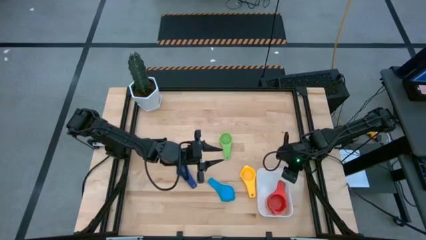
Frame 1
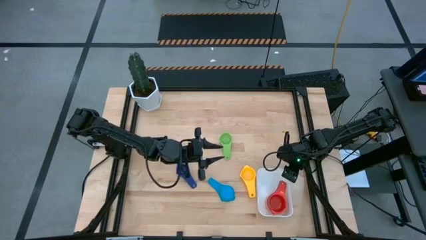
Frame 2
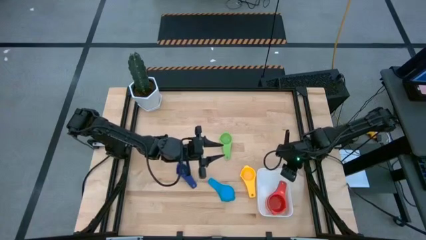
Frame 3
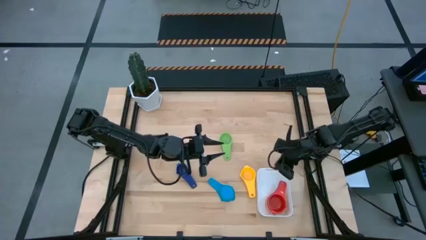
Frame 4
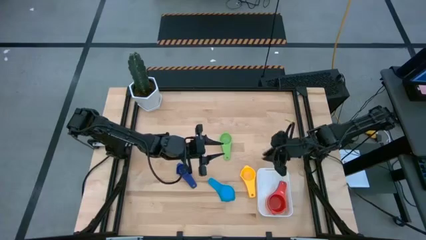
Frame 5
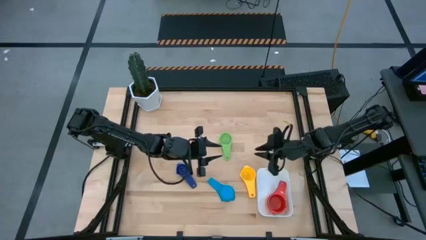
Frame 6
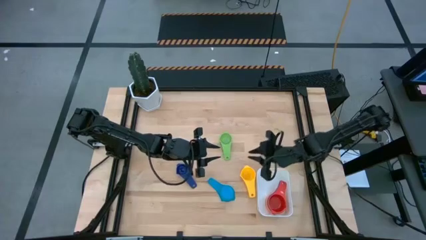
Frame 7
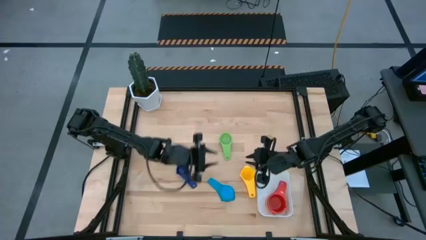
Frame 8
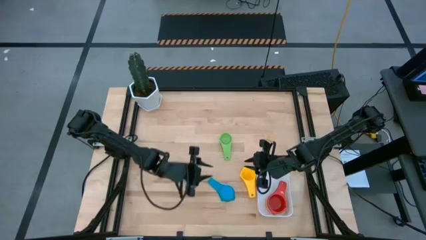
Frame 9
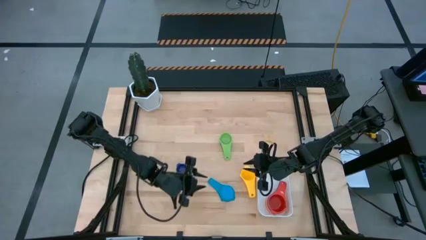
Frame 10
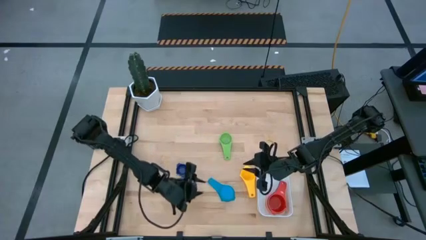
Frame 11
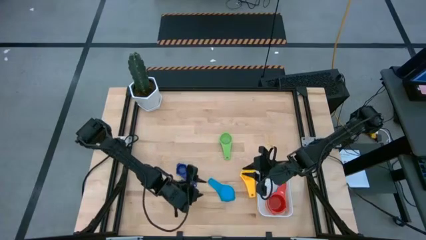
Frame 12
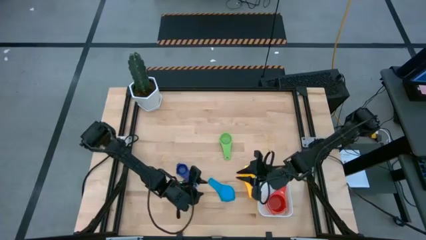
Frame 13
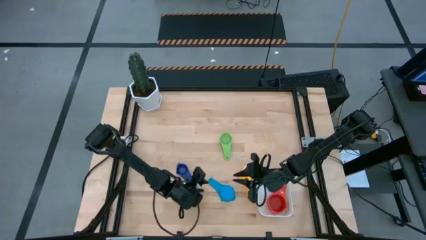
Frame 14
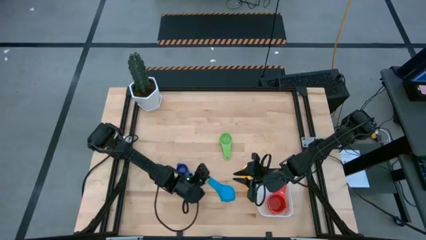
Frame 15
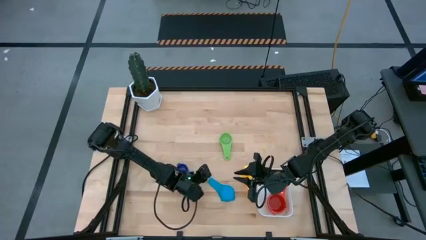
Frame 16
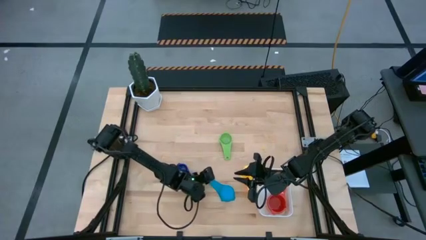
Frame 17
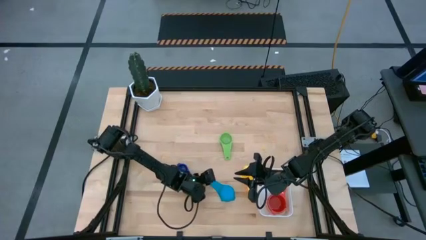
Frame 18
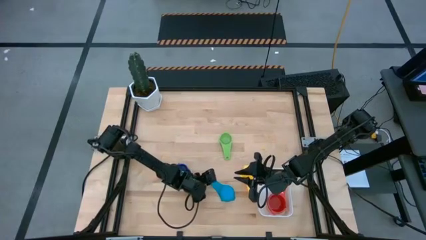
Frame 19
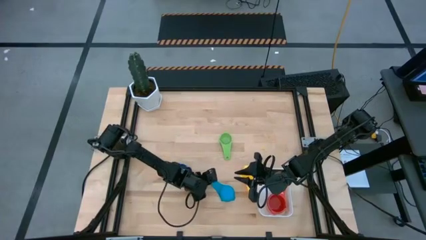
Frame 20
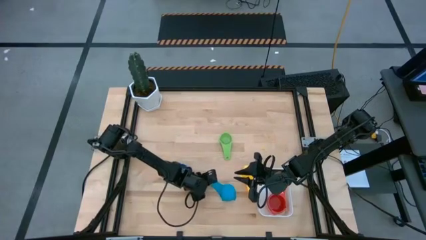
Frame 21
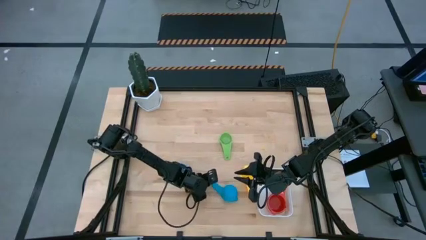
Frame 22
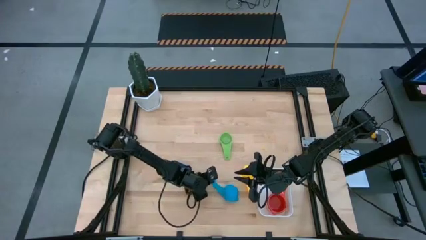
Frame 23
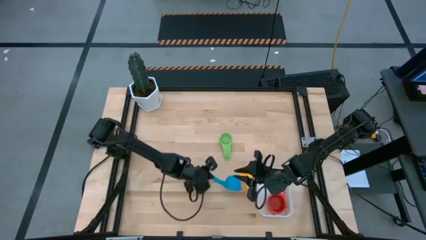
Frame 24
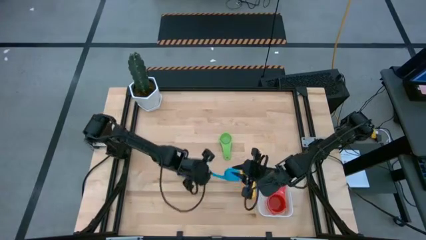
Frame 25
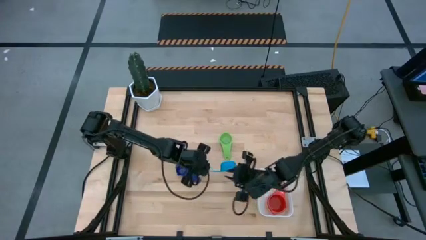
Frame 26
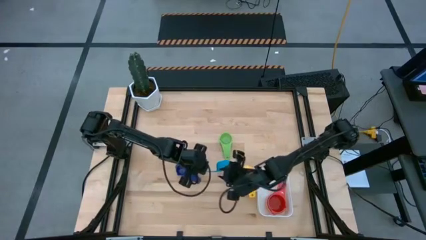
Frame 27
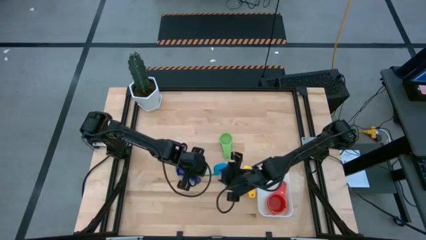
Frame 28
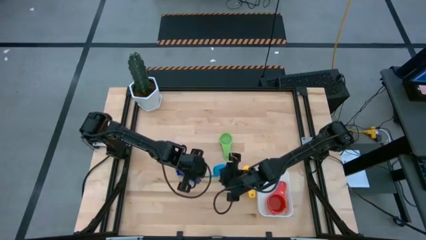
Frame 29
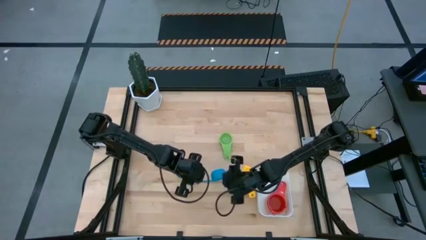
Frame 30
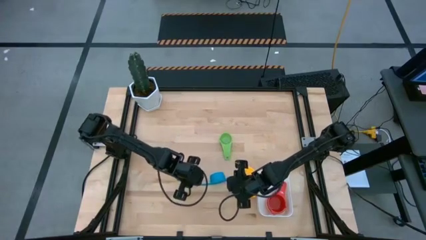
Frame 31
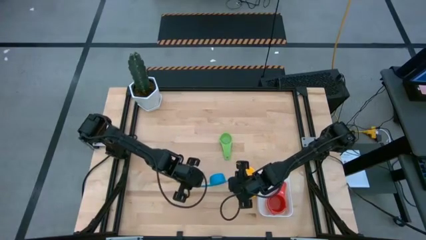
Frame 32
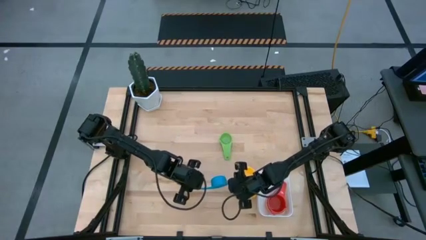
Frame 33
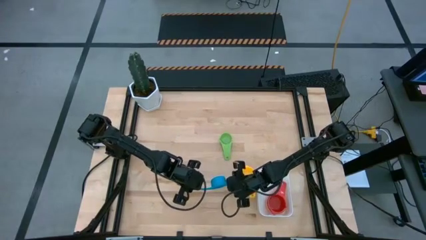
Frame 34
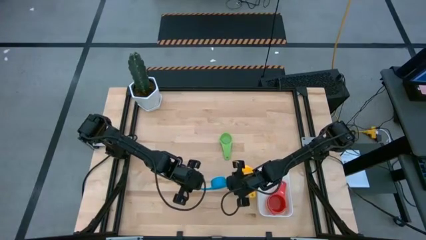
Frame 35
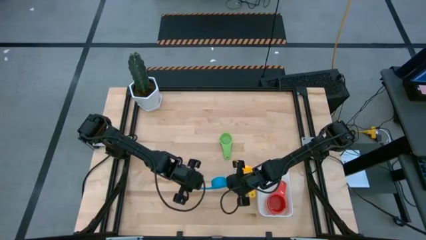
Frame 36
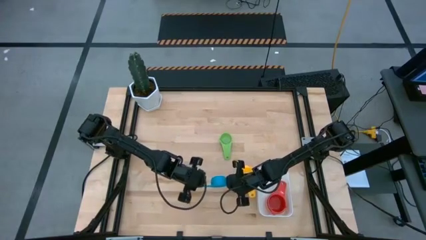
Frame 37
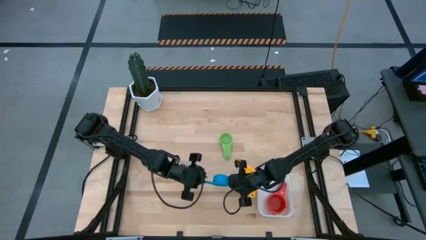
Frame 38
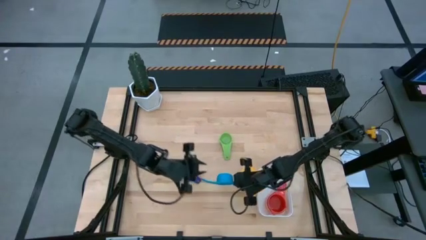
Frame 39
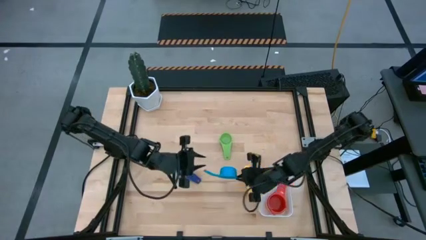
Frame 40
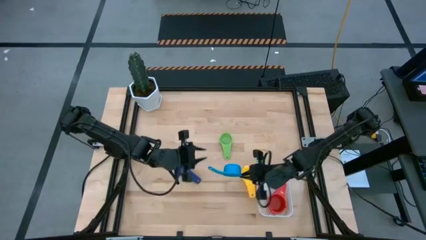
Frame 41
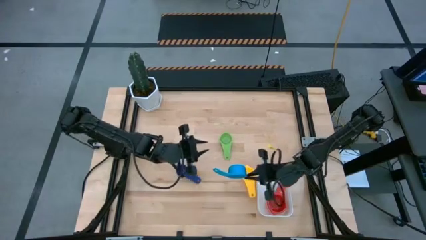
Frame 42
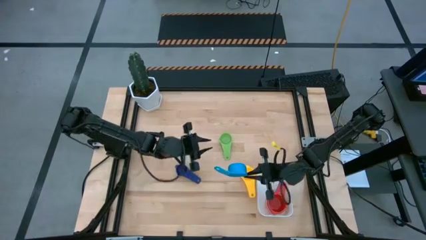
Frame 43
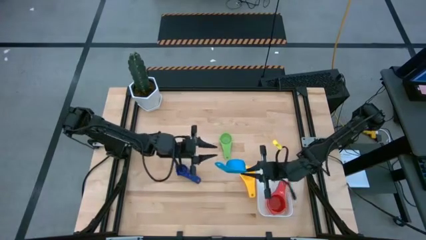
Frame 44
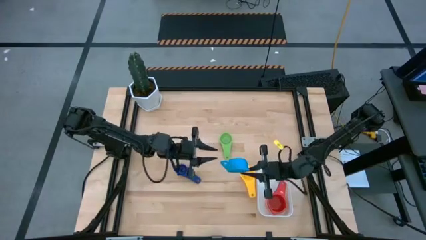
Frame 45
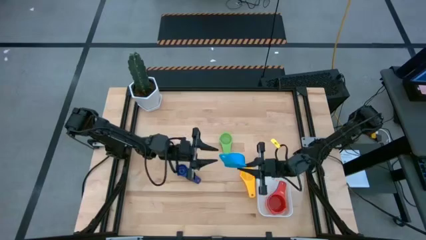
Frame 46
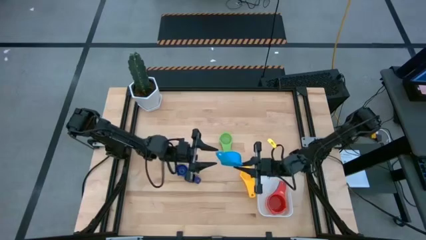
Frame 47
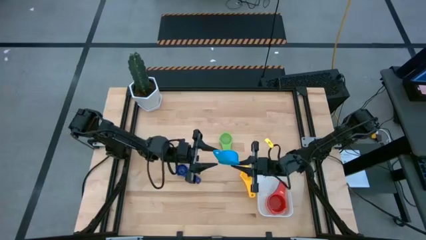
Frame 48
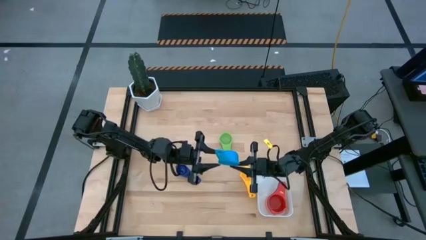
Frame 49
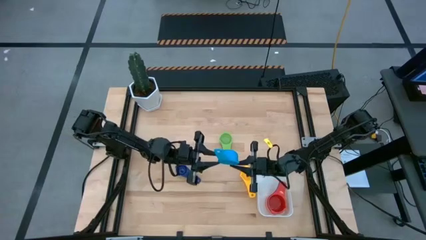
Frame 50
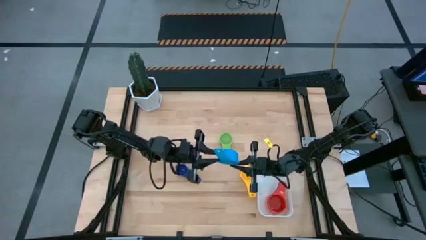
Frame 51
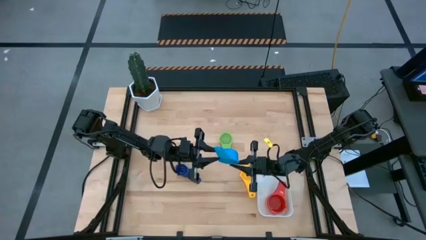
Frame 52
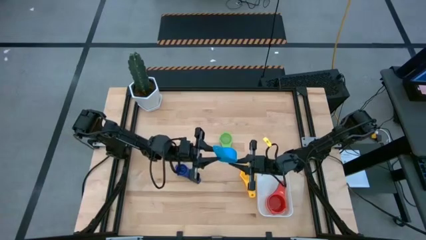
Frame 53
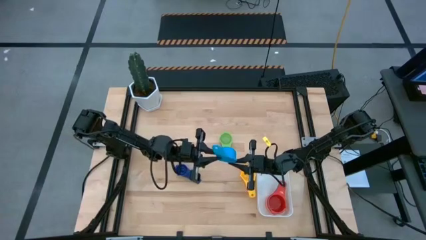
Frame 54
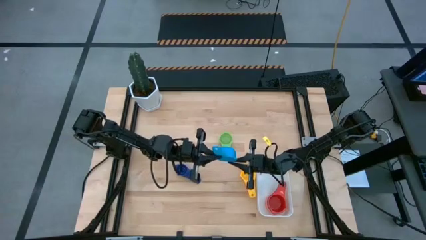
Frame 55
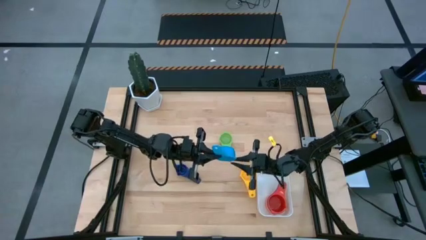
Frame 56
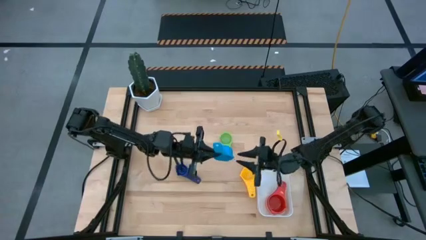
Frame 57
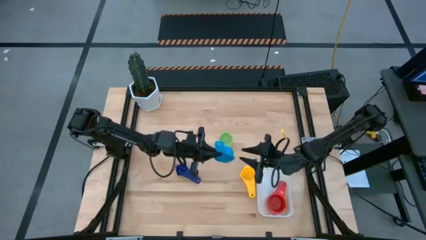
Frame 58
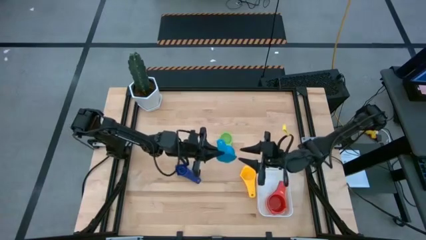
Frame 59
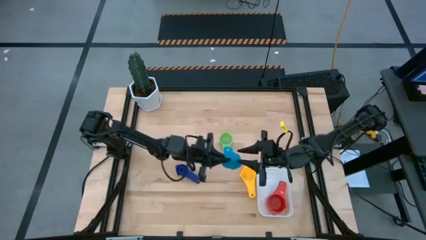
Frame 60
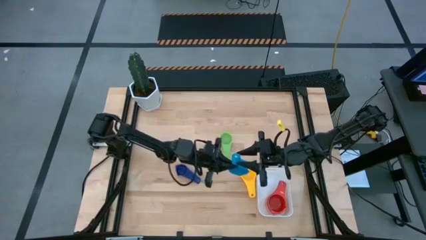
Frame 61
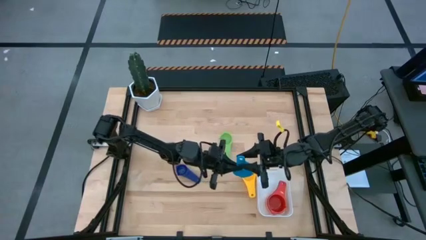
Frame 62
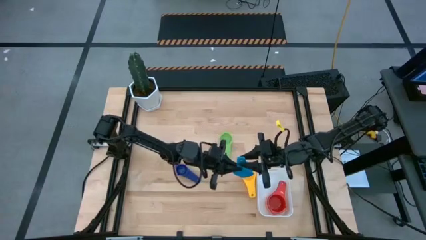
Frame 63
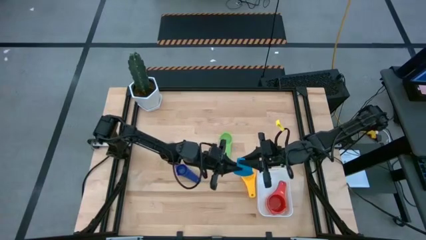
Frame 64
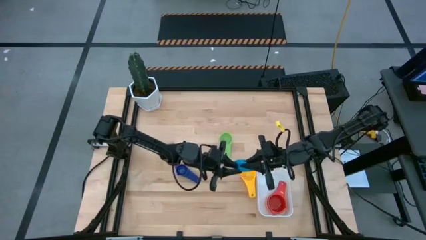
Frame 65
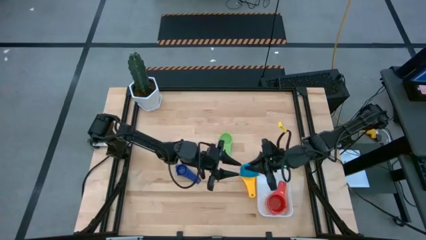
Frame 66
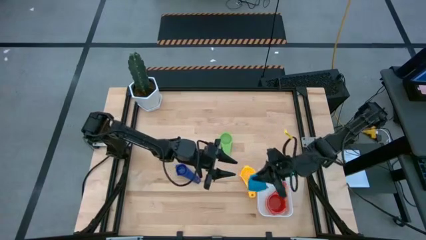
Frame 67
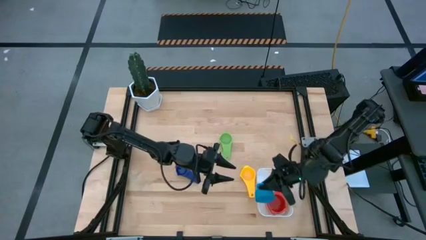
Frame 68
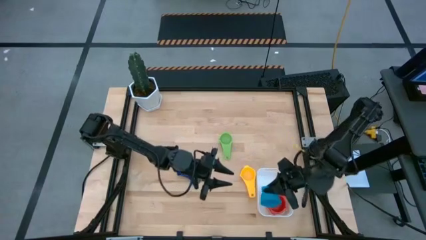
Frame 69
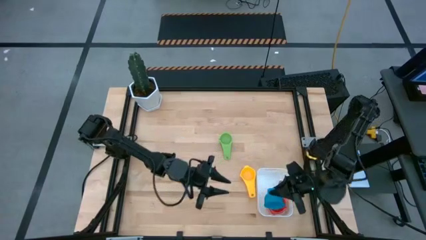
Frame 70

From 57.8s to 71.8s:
Task: Nest measuring cups in basket
Stack the light blue measuring cup on top of the red measuring cup into the white bin

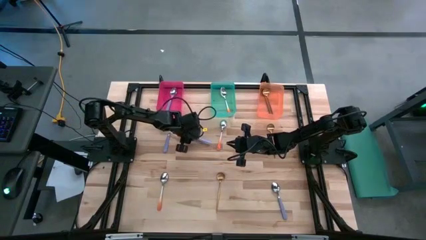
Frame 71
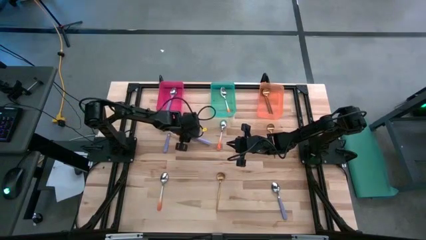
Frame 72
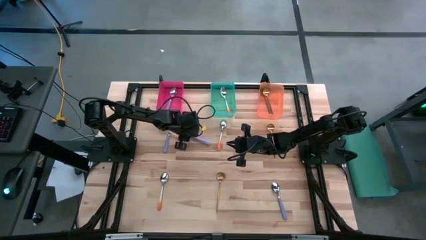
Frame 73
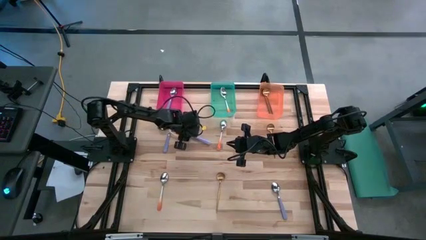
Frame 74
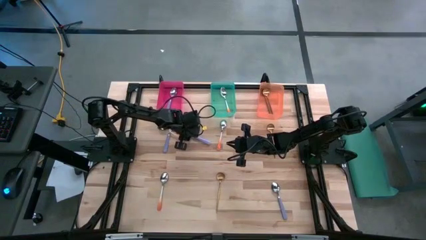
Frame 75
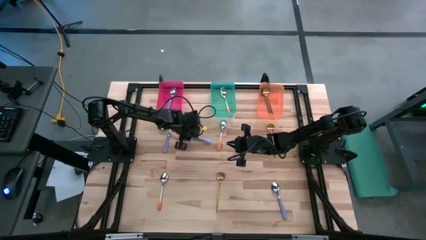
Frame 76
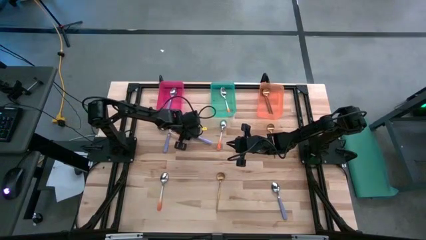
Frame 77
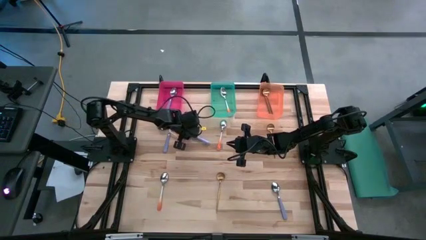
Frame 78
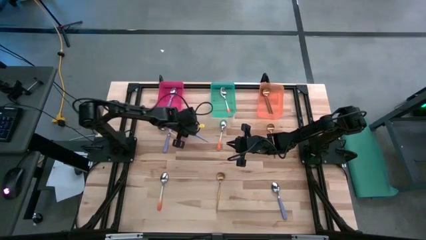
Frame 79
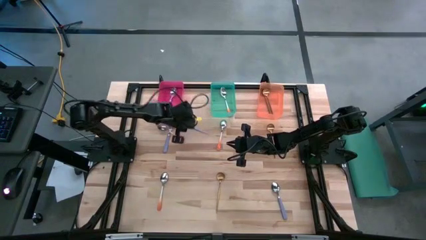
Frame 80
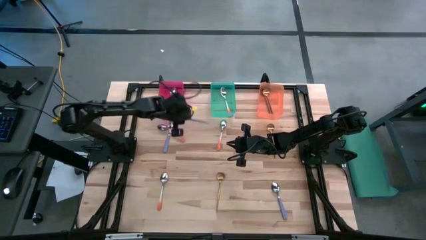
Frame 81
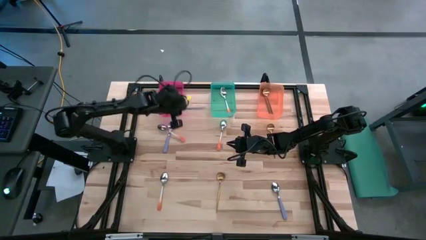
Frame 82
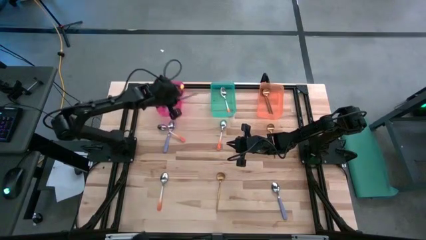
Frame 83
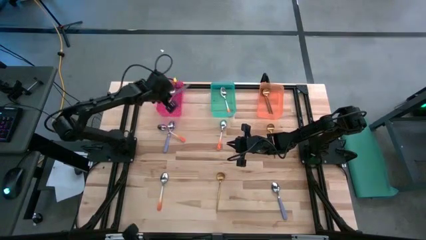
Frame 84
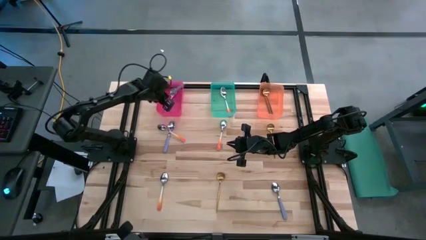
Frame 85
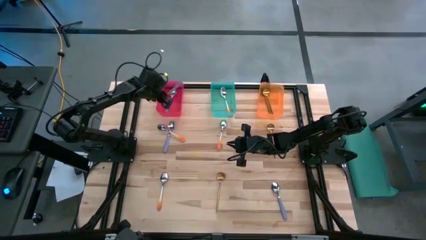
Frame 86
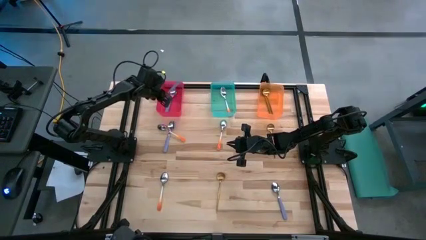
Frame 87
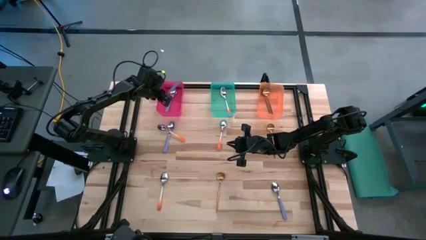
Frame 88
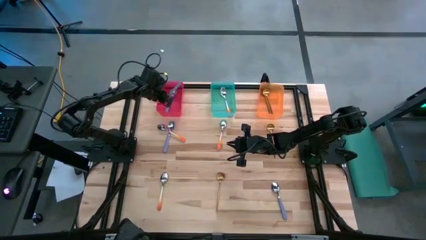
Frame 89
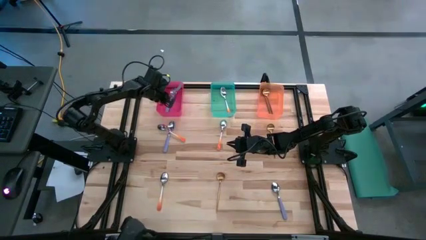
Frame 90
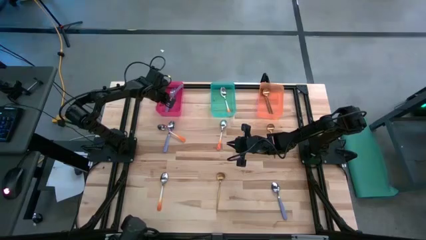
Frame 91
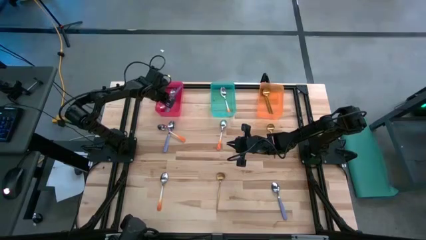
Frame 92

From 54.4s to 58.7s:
Task: Sort silverware by color (type)
Put the violet spoon into the red bin
